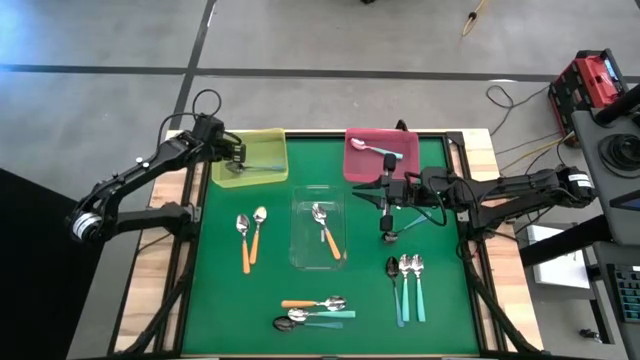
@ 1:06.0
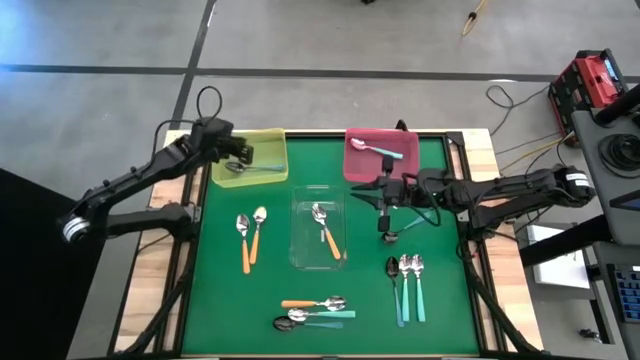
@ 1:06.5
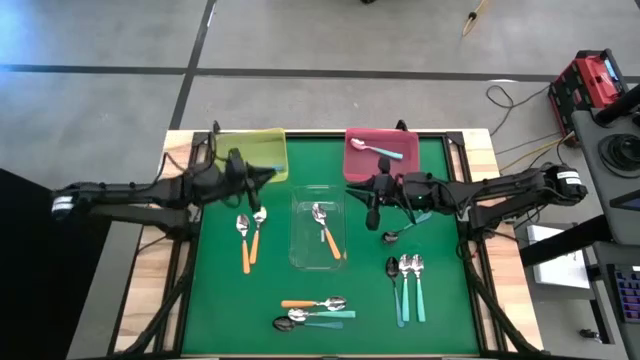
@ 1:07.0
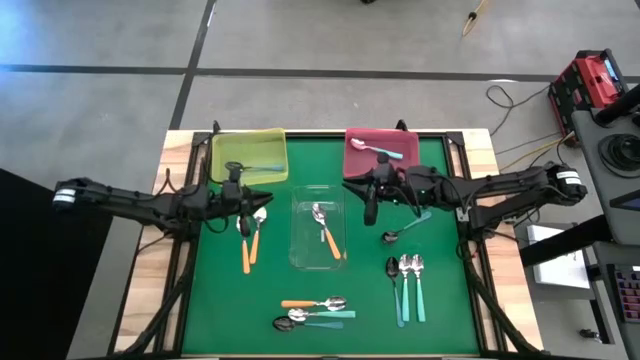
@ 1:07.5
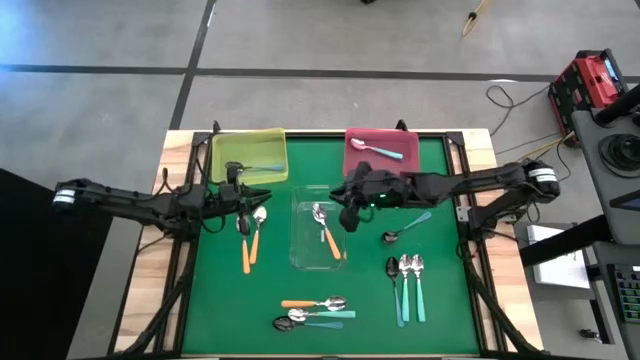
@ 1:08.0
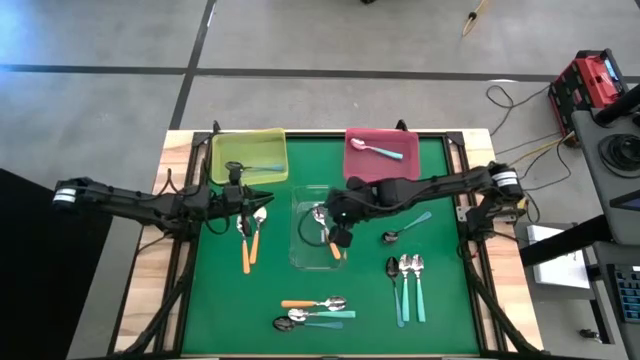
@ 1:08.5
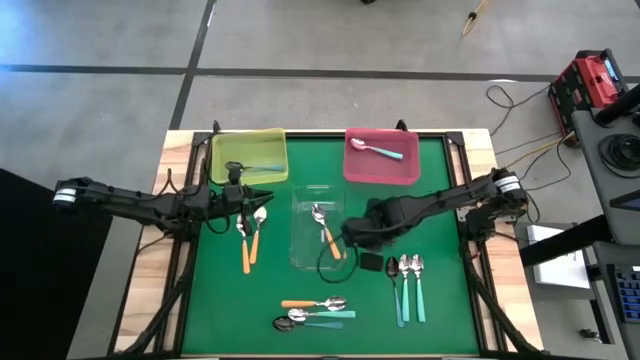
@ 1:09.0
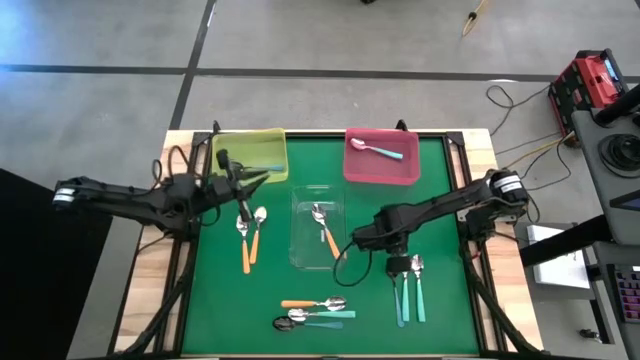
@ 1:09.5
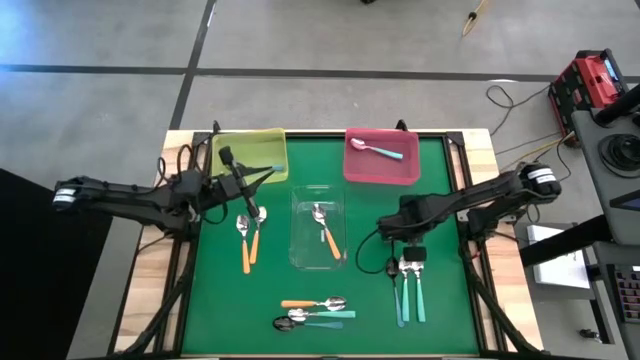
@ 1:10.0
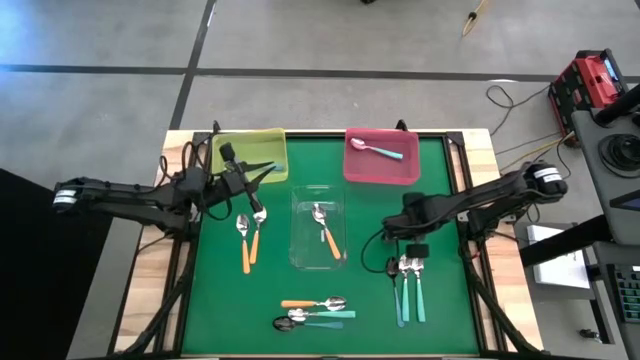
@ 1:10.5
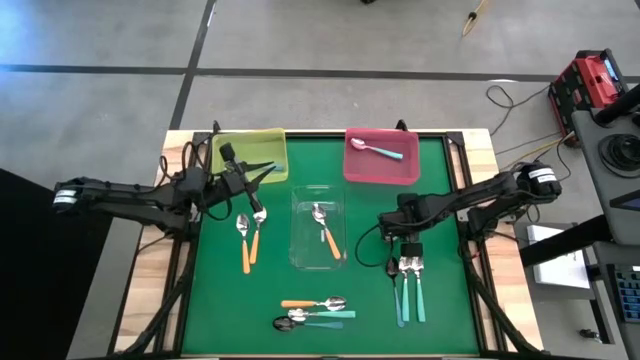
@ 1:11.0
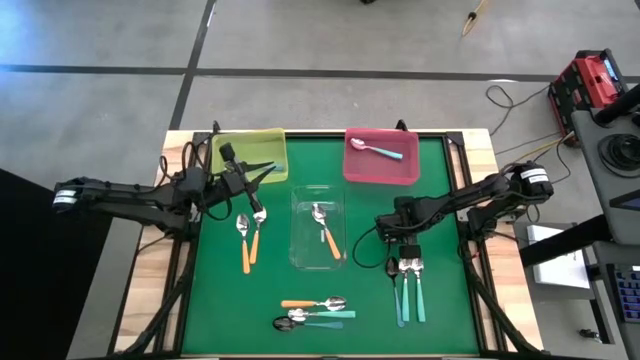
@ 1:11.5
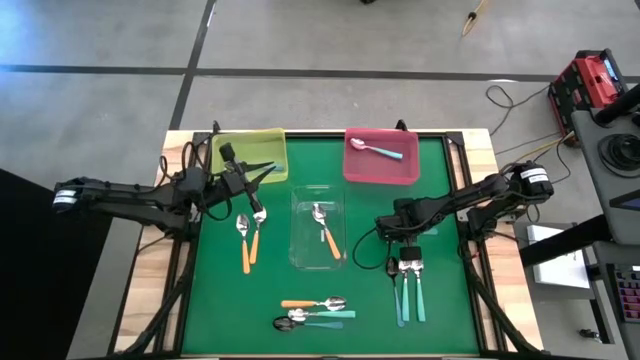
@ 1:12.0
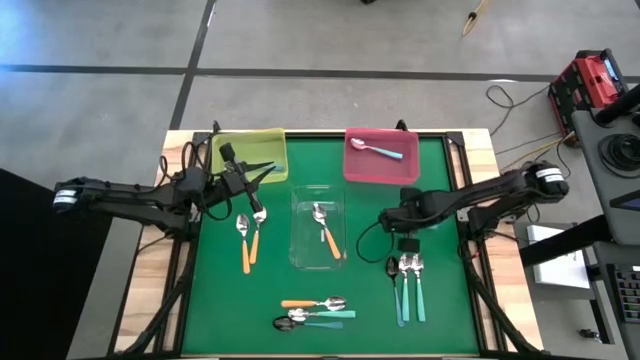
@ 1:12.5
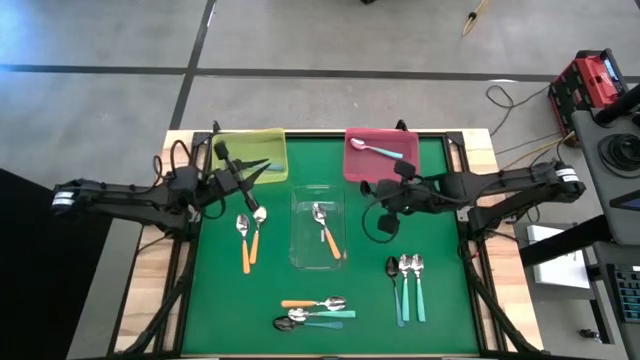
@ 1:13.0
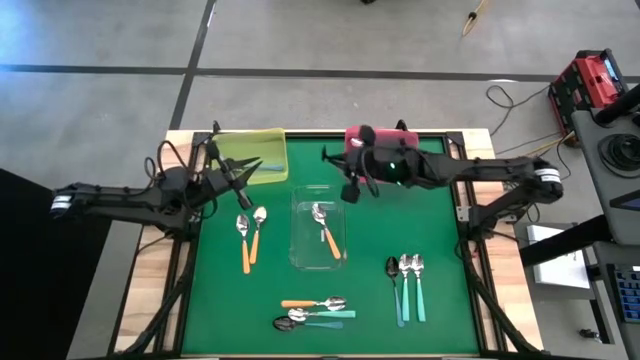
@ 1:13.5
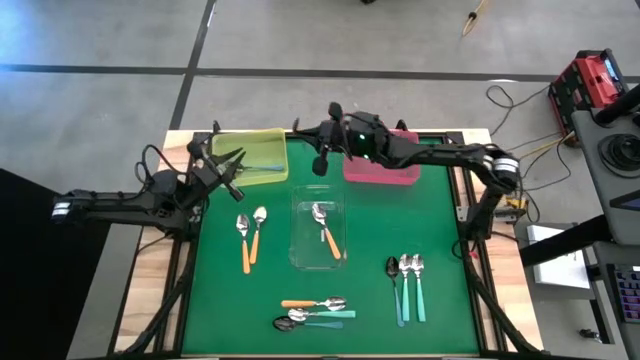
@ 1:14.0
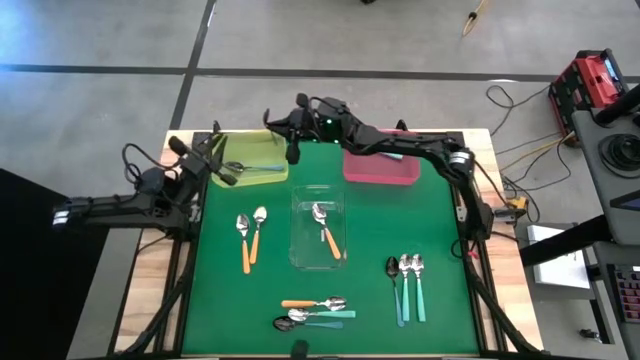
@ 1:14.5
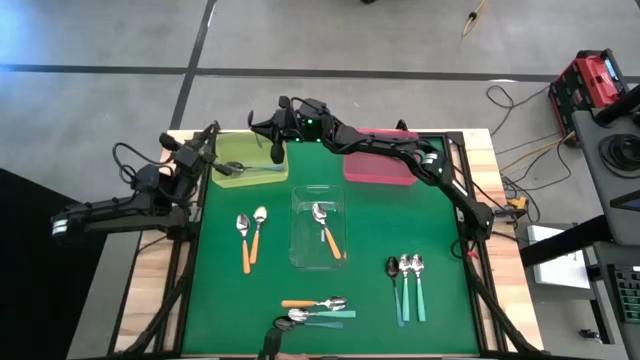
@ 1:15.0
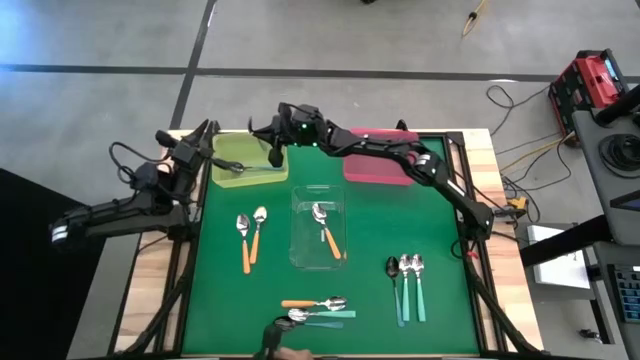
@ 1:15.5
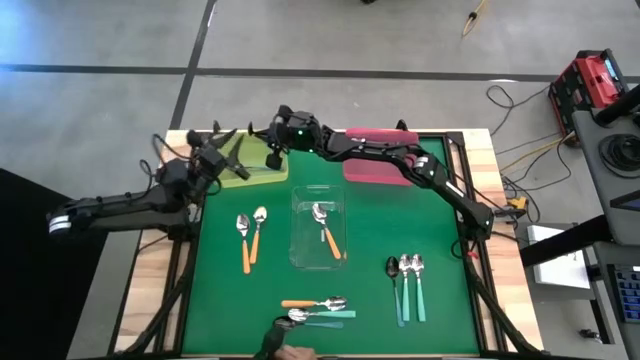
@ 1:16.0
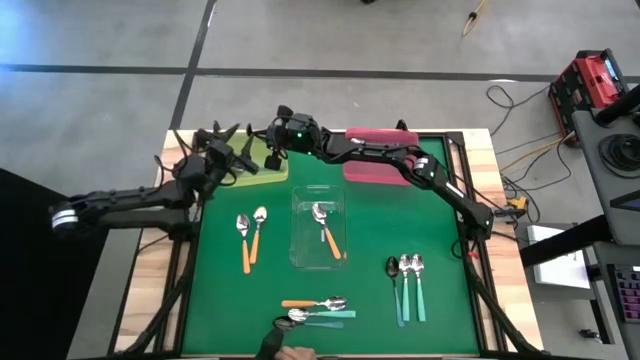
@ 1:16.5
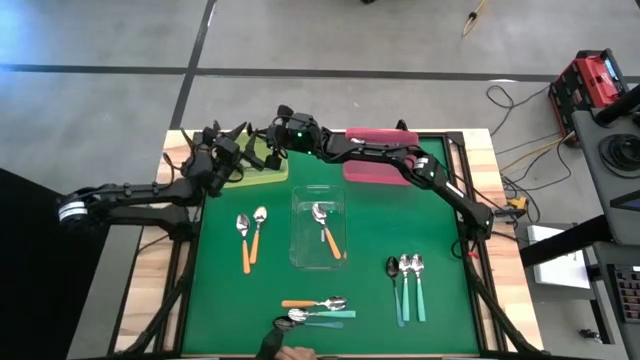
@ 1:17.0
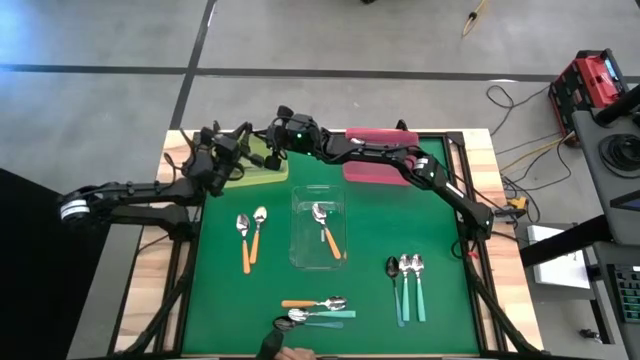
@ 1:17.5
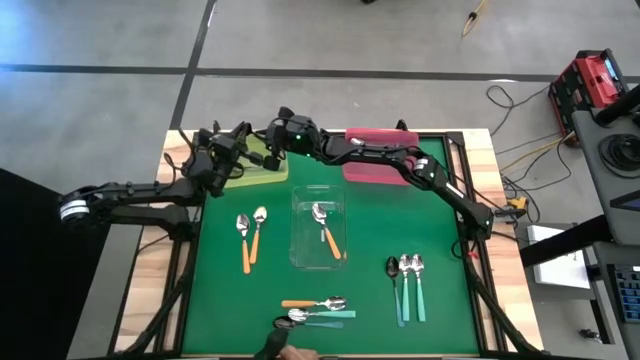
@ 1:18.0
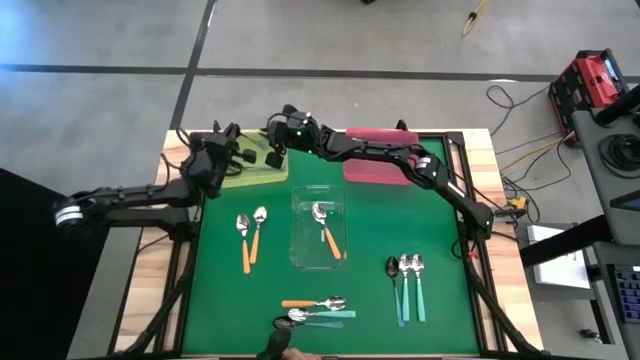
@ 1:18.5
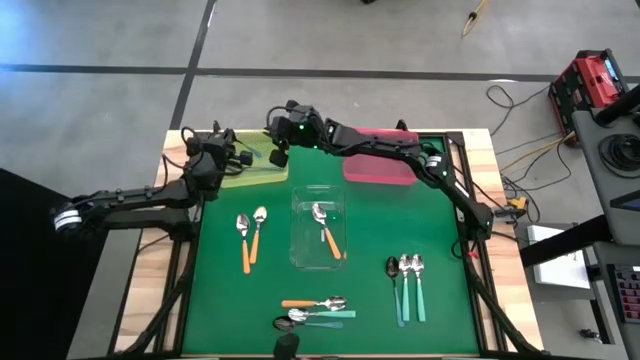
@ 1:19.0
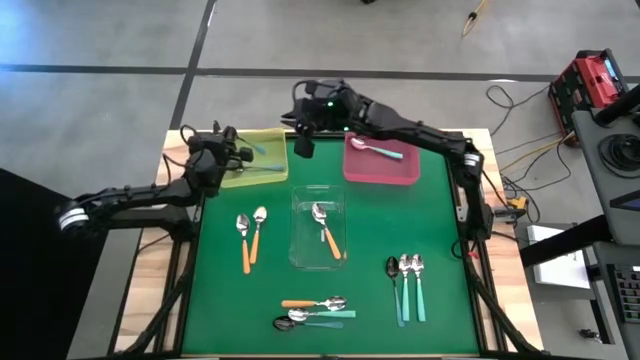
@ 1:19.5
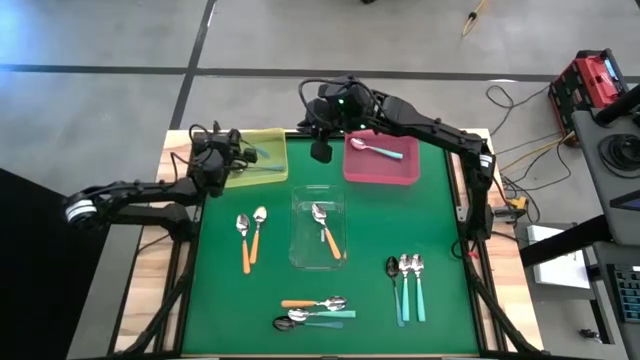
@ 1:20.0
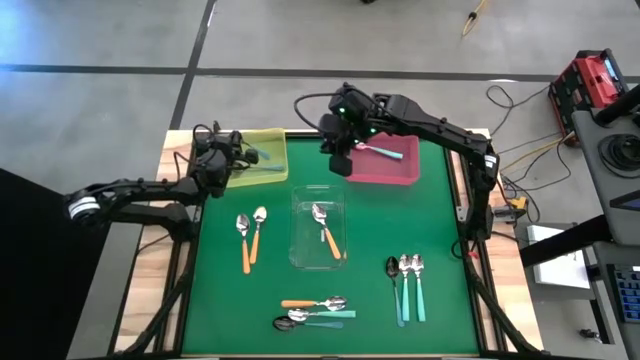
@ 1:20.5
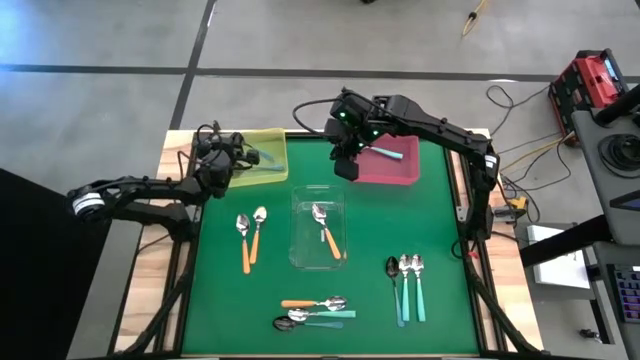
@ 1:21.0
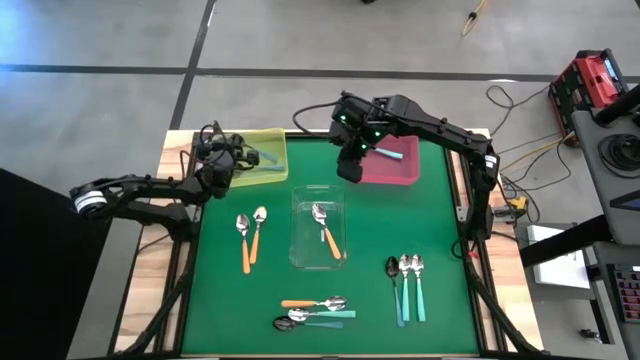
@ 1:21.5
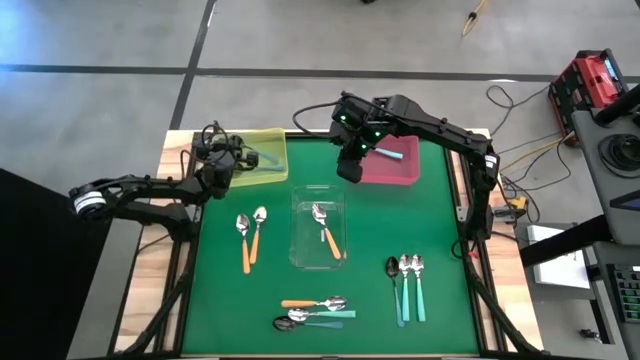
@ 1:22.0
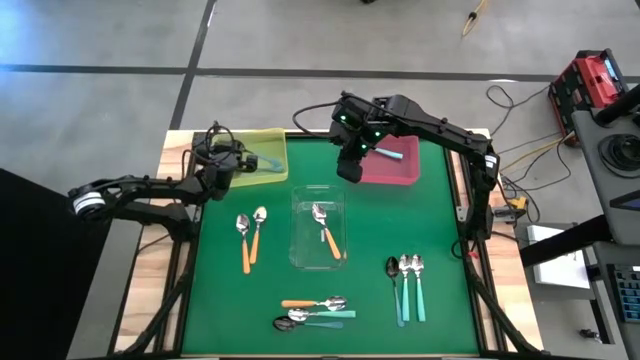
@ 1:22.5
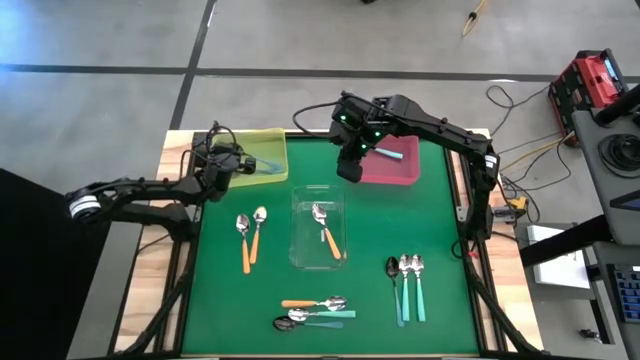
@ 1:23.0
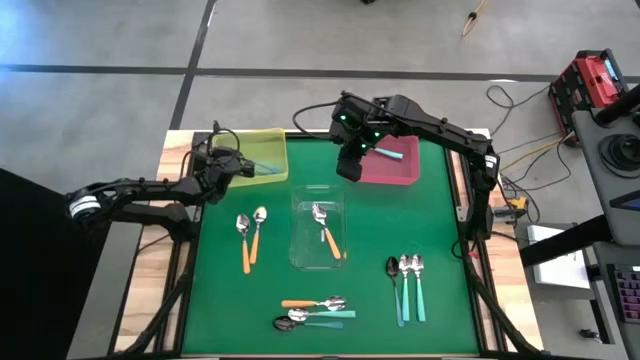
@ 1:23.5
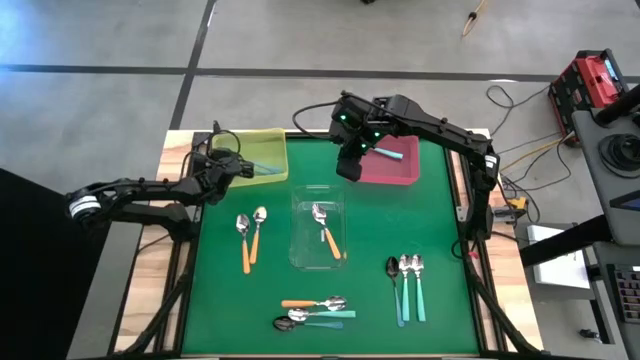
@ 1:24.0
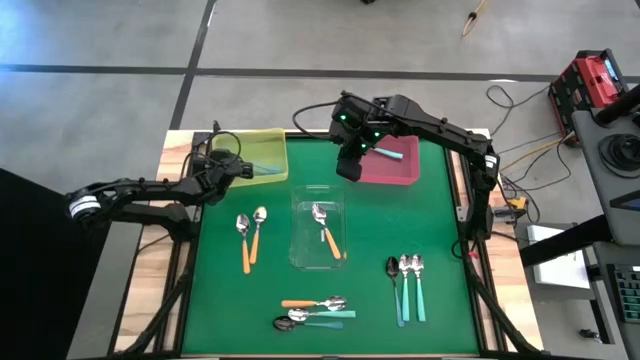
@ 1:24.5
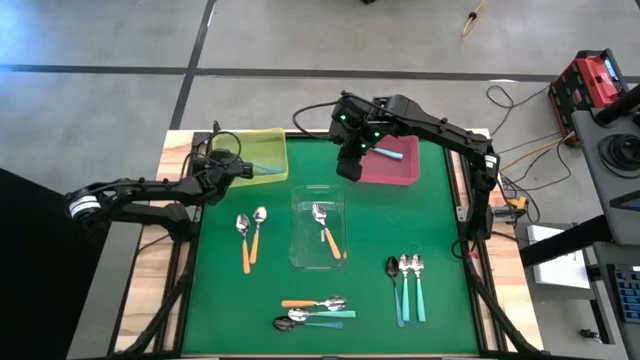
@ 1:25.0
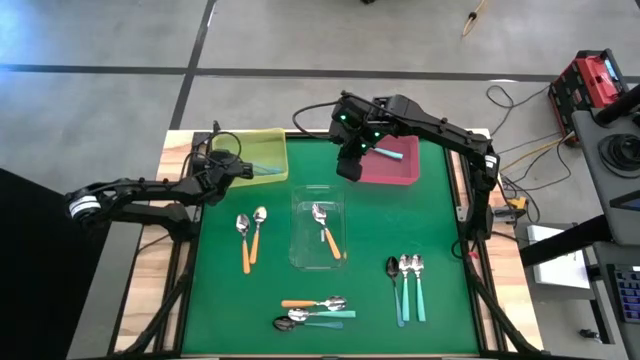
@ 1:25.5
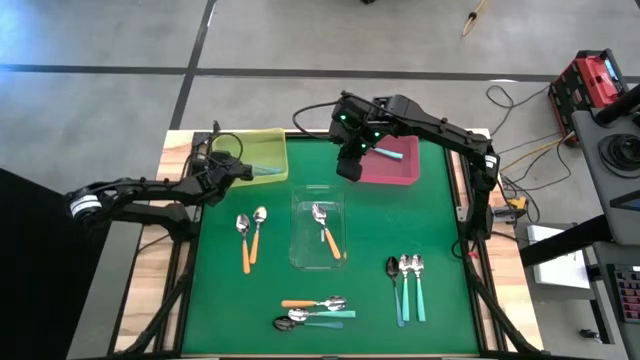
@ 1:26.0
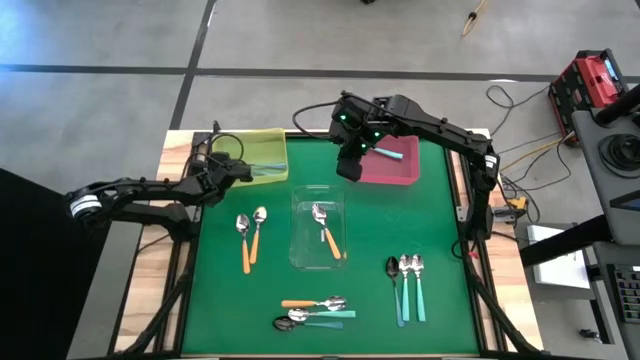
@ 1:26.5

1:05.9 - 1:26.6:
Task: Sort silverware by color (type)
Put the middle right blue spoon into the yellow bin

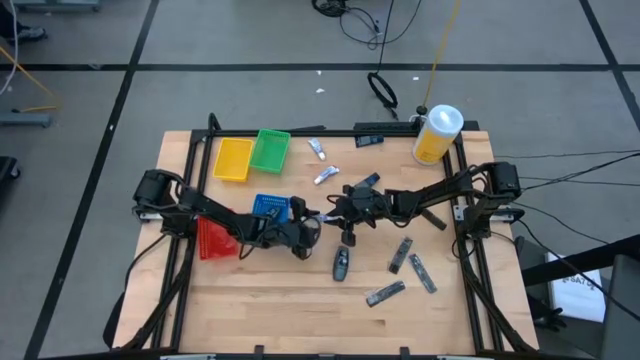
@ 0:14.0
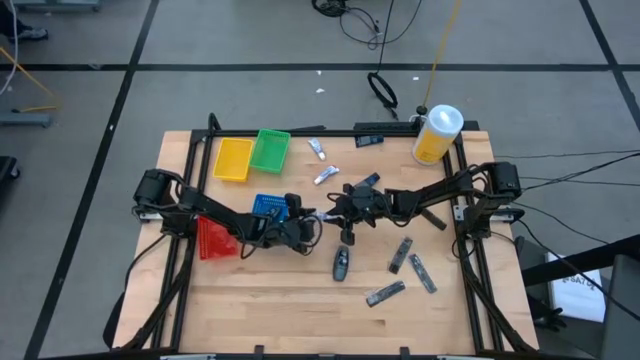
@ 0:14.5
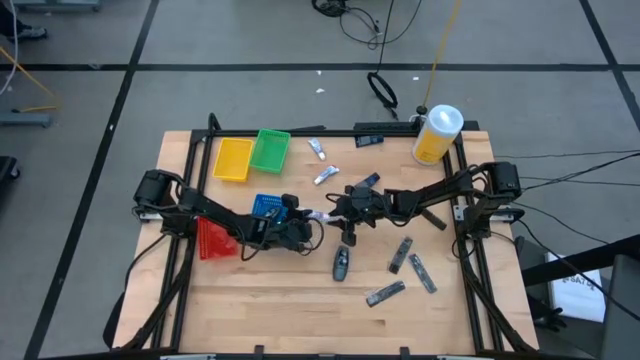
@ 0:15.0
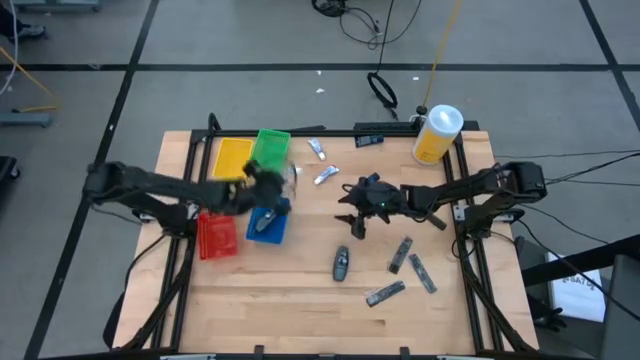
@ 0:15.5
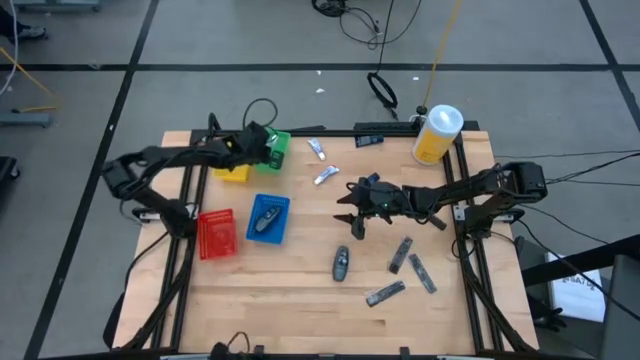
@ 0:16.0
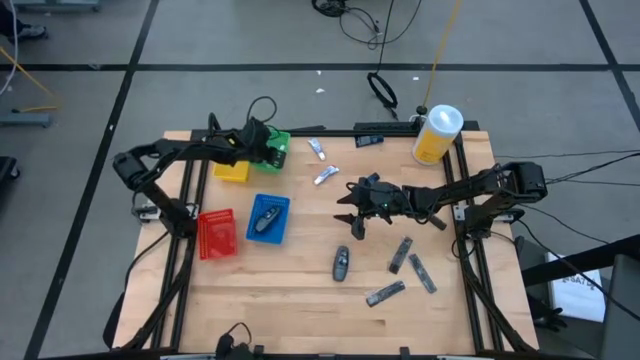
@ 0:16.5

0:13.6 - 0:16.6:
Task: Pick & Place Travel size toiletries
Put the white toothpaste into the green bin
